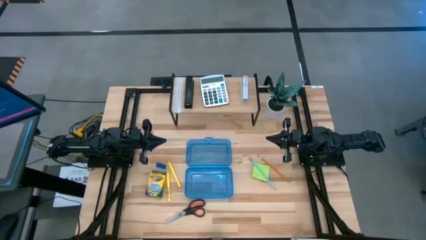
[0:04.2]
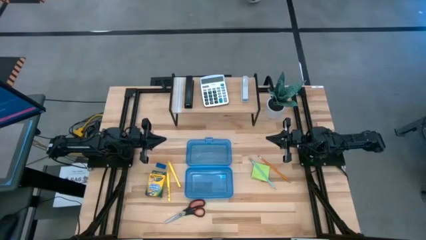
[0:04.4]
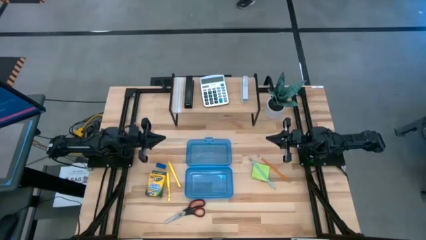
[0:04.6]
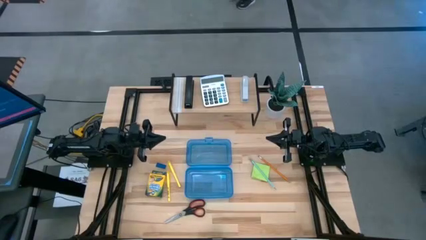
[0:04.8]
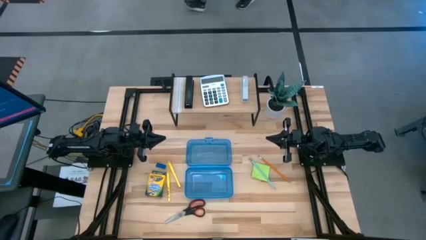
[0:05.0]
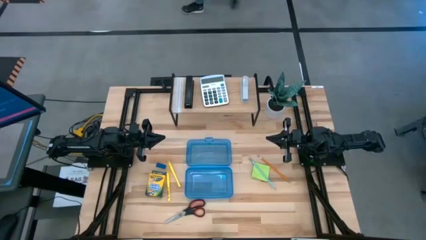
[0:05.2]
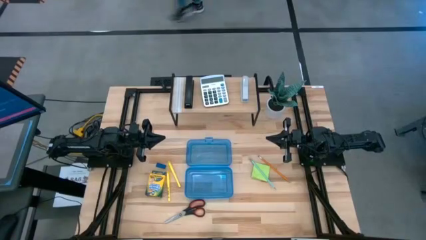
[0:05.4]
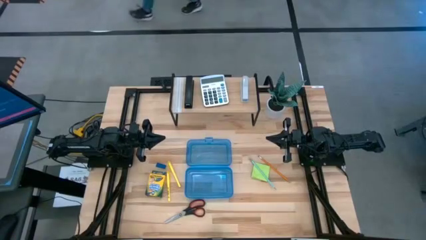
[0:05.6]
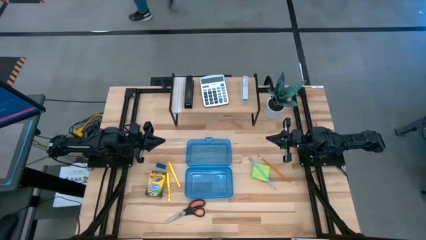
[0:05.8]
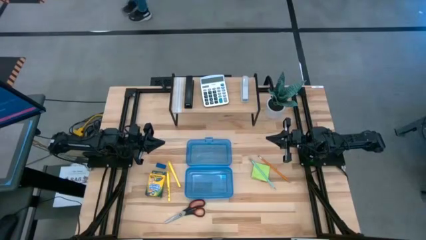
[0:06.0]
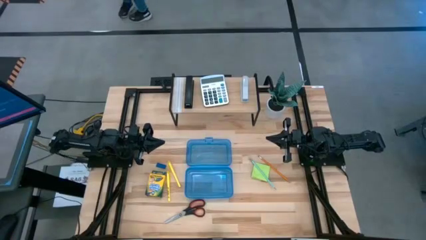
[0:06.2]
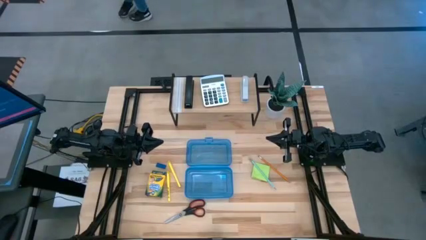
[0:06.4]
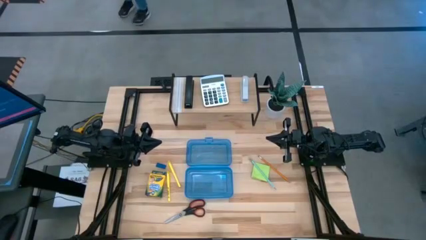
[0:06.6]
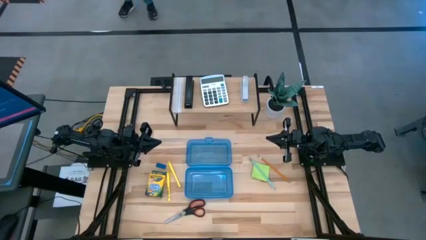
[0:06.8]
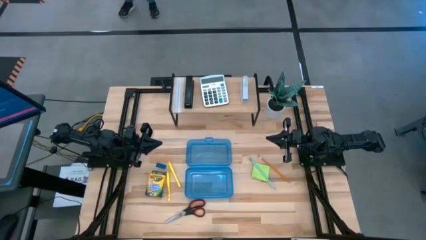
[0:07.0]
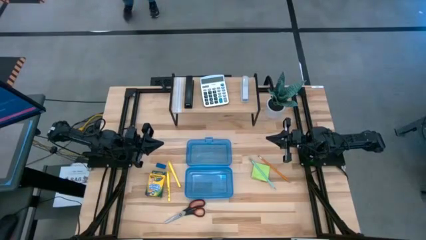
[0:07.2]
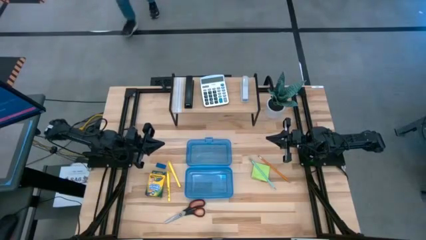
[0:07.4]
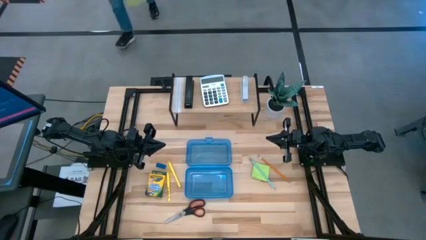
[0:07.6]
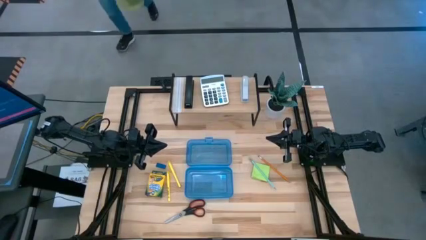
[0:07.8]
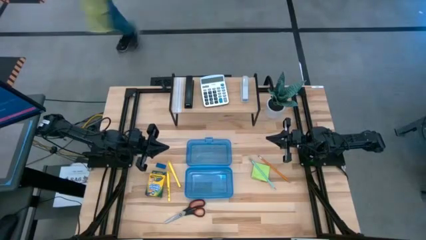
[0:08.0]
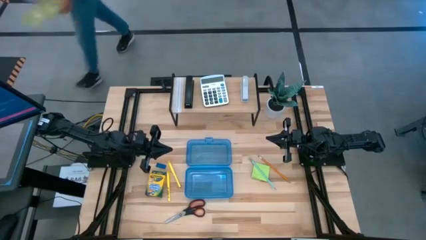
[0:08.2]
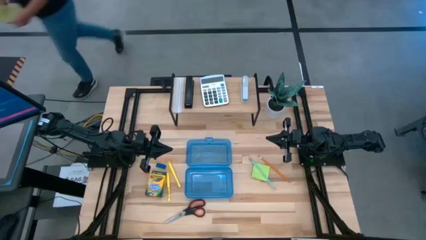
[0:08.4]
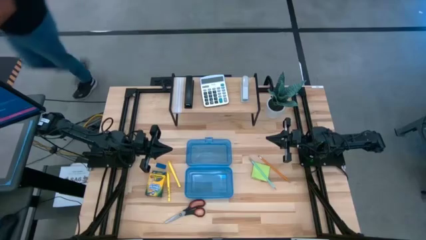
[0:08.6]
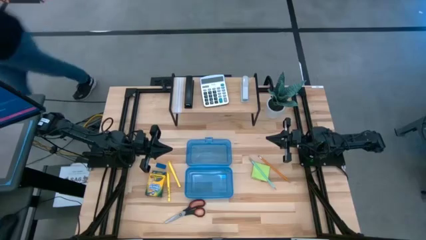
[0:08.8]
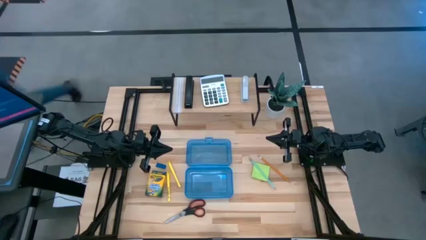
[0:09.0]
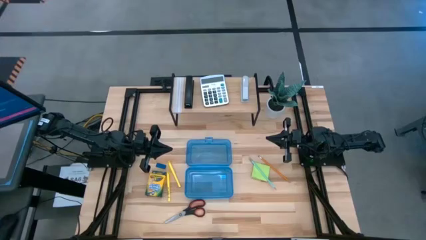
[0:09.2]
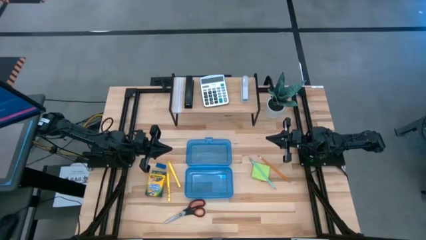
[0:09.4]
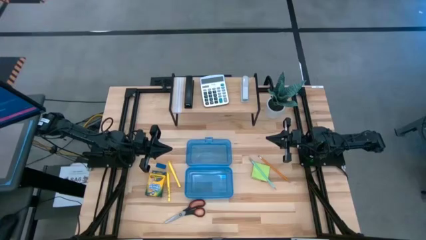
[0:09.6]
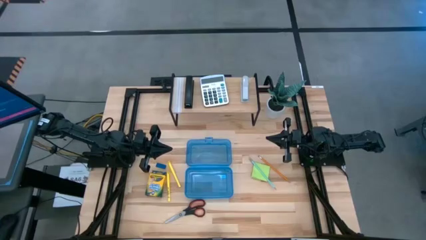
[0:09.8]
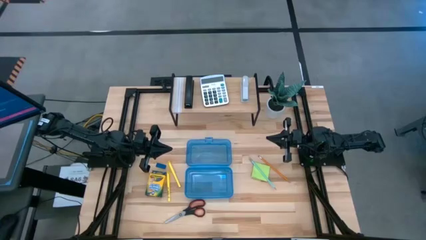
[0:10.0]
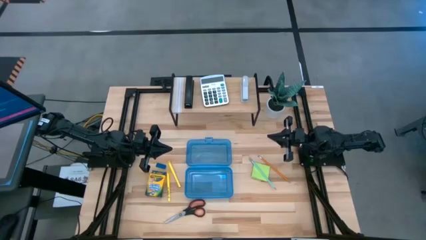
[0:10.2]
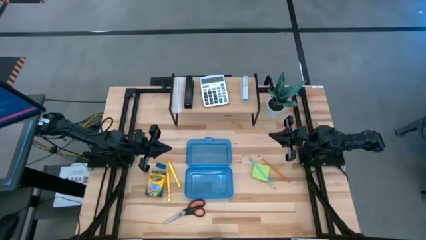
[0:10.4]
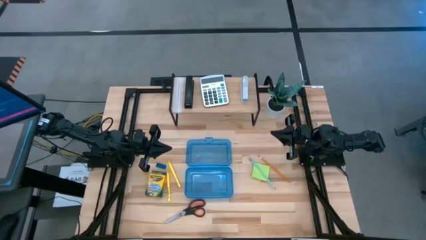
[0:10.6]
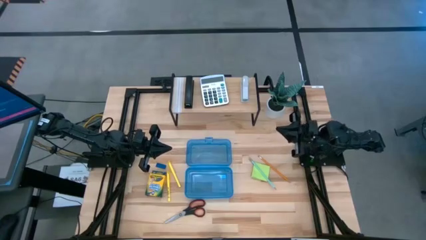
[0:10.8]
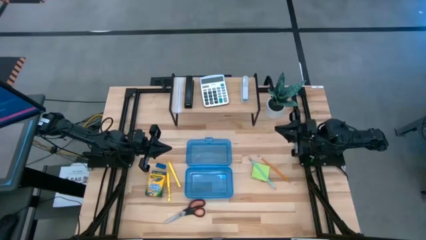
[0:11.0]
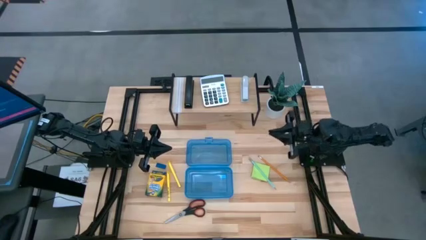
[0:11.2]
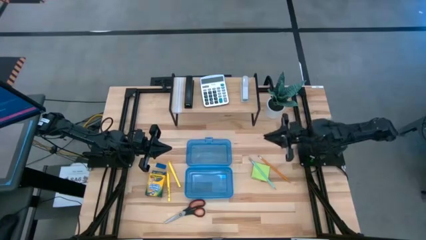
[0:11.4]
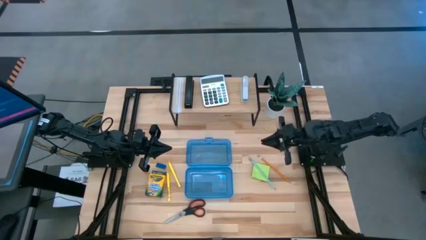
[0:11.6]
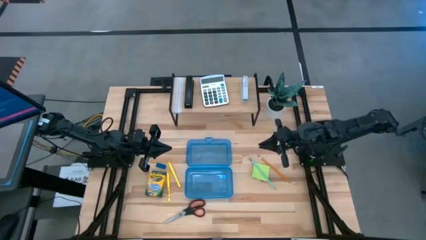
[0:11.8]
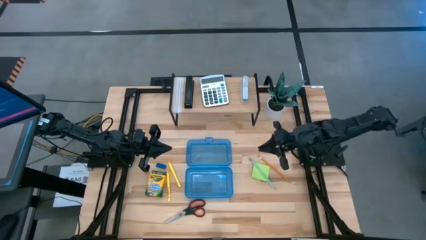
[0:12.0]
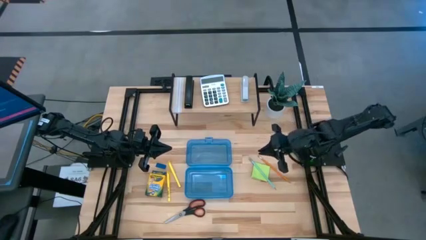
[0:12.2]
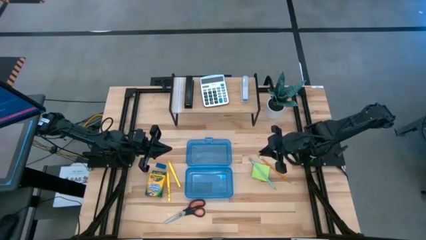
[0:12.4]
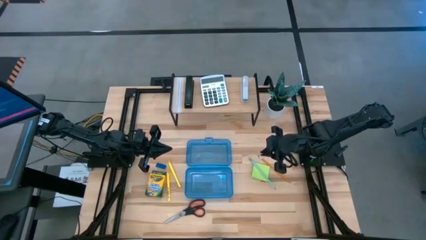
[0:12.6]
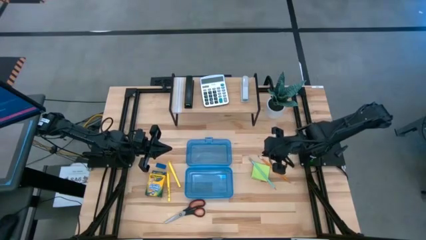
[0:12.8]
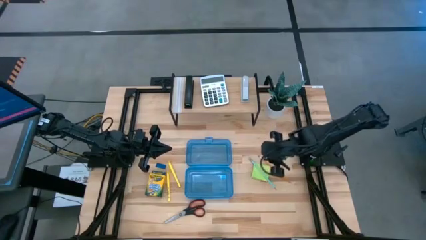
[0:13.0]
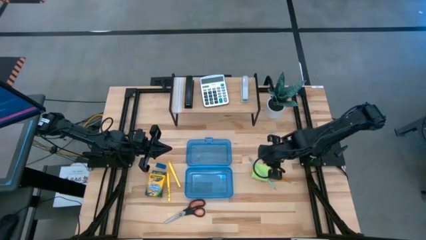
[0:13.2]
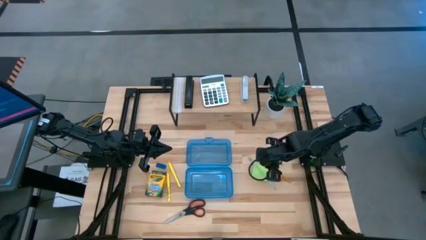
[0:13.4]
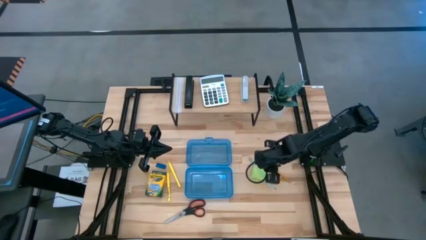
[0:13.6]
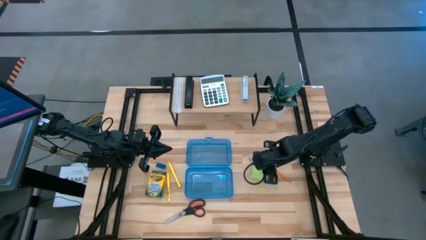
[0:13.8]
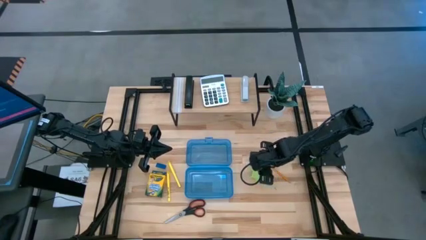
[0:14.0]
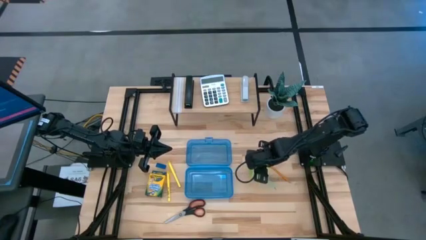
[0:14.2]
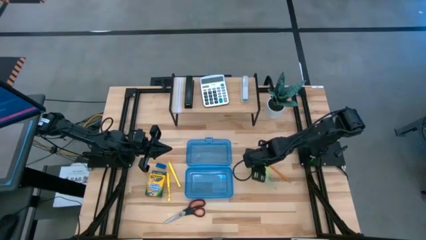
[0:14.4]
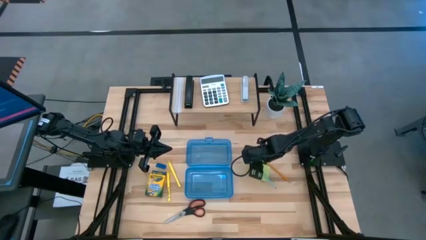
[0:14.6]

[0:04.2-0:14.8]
Task: Pack school essentials
Put the blue pencil into the blue supply box

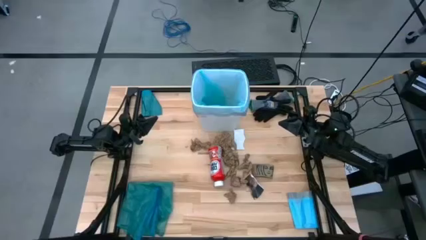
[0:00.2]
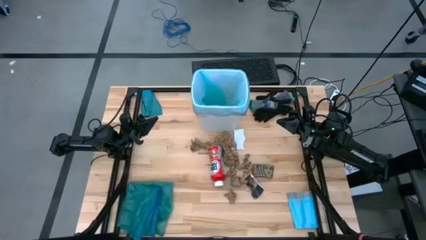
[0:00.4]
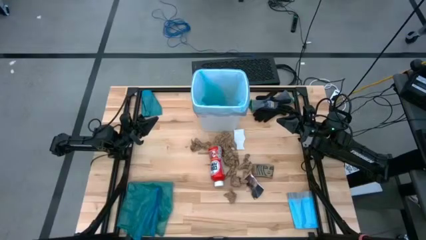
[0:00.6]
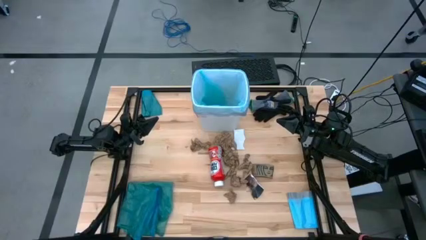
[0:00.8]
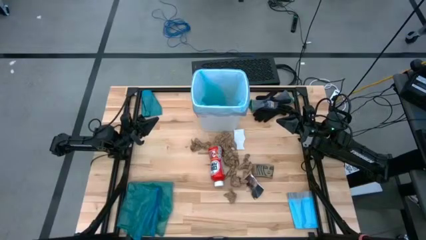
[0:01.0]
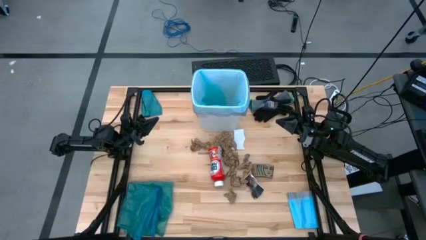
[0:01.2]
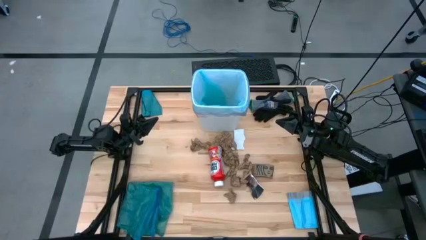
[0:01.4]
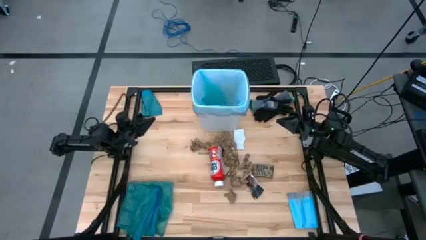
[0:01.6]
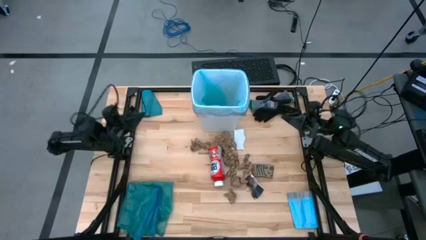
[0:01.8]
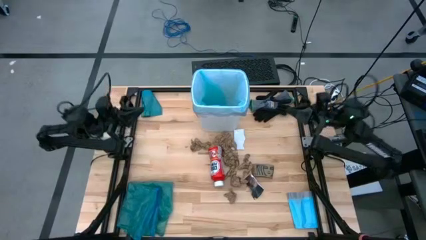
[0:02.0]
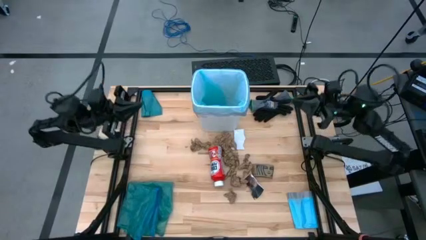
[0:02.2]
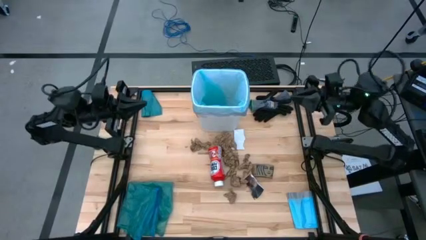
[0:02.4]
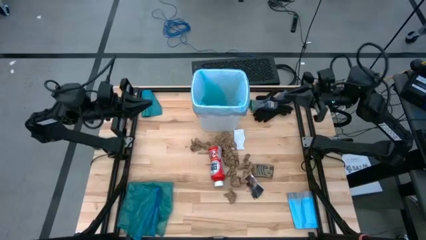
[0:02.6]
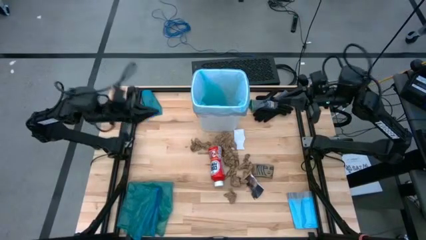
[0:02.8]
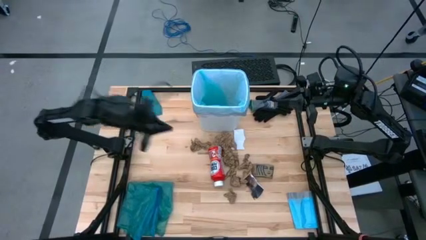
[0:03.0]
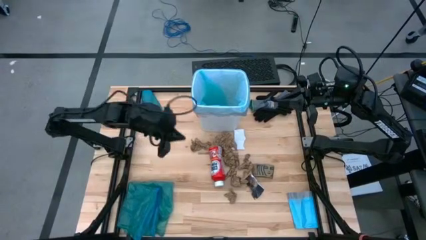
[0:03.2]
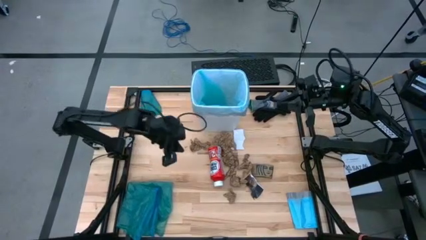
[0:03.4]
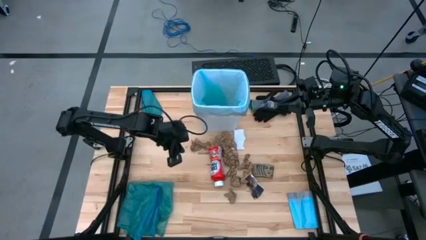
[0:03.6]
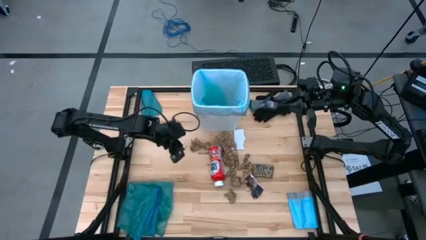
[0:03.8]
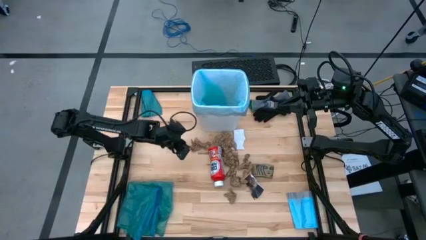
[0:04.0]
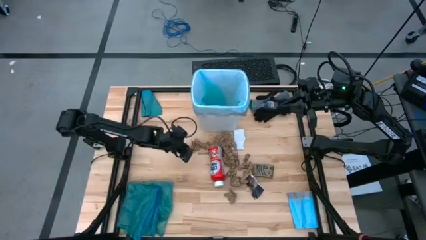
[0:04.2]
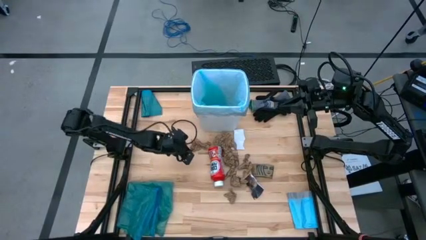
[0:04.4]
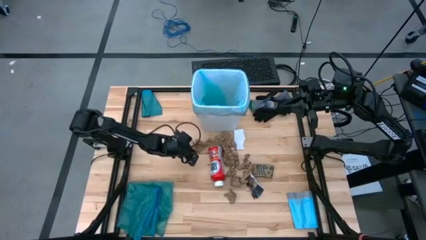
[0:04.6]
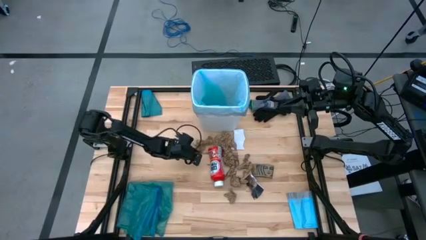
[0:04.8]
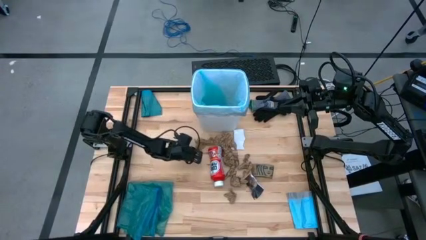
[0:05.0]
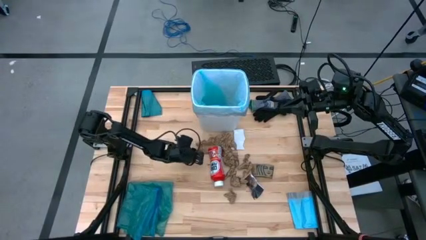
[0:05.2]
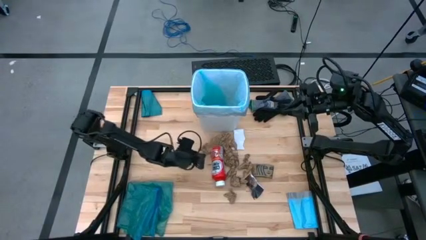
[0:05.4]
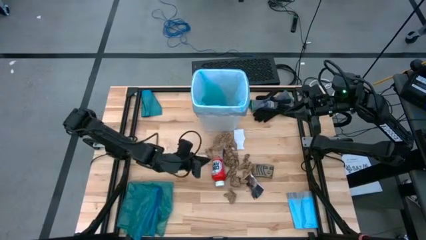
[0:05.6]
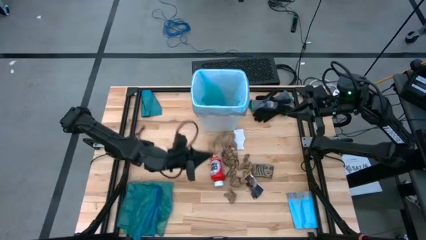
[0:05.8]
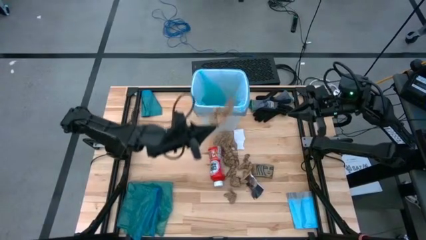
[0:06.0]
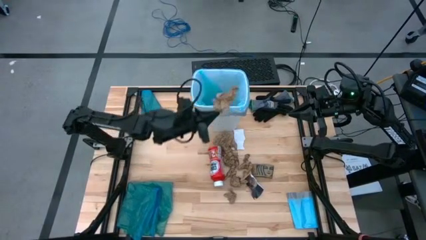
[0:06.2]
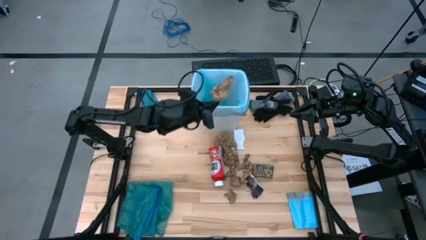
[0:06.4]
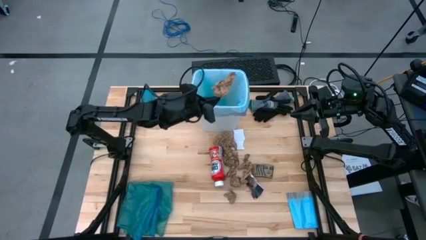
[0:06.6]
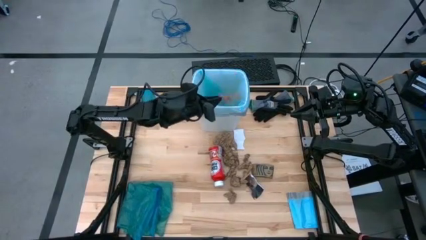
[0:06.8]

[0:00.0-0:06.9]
Task: place trash/remove bag and relplace
Put the brown paper into the white trash bin
